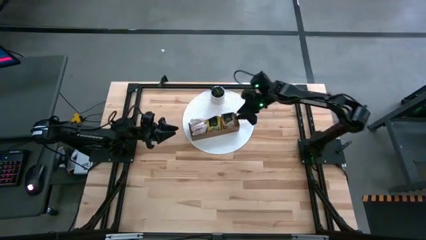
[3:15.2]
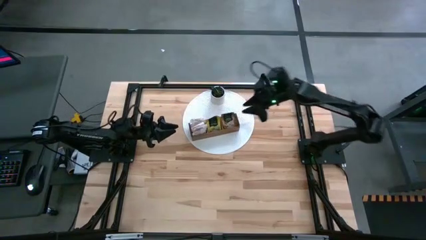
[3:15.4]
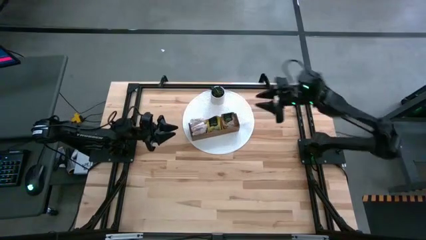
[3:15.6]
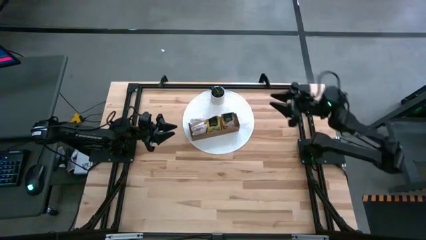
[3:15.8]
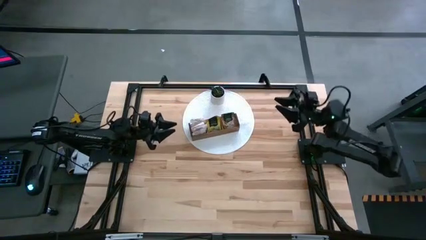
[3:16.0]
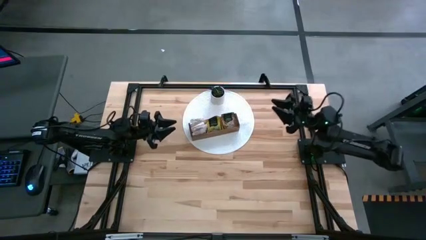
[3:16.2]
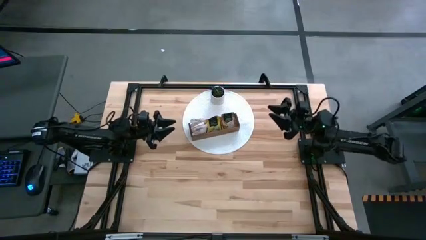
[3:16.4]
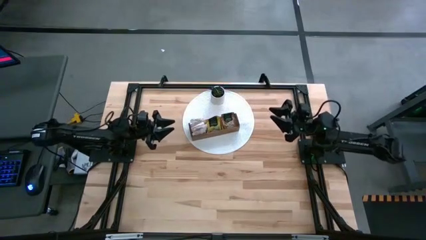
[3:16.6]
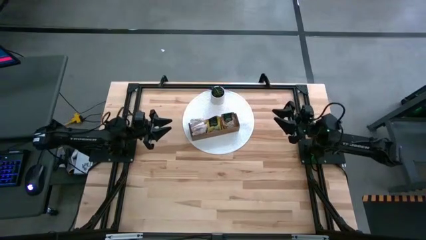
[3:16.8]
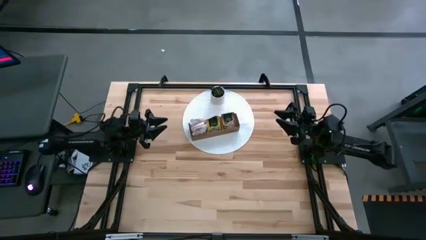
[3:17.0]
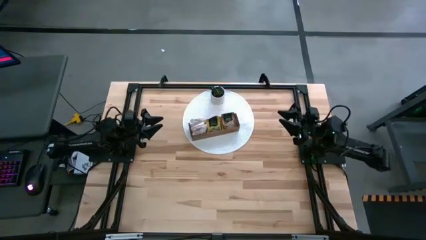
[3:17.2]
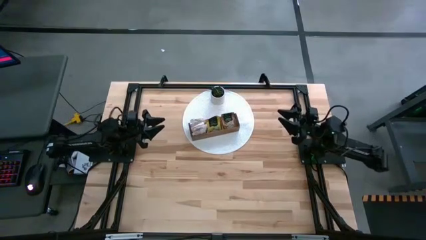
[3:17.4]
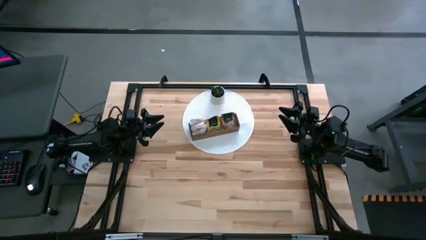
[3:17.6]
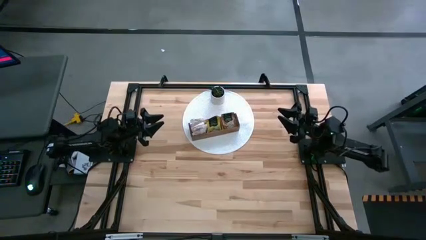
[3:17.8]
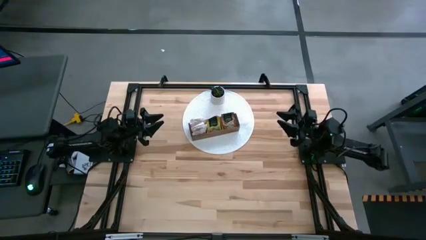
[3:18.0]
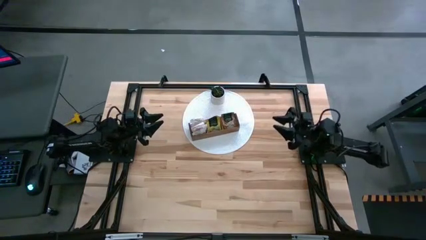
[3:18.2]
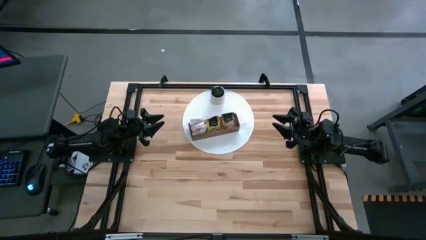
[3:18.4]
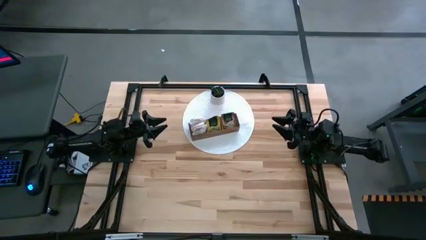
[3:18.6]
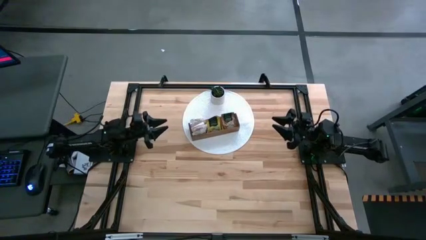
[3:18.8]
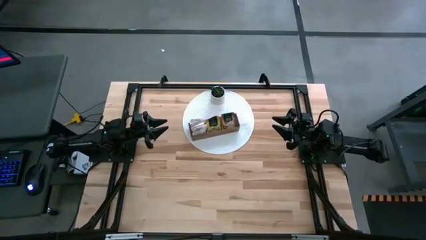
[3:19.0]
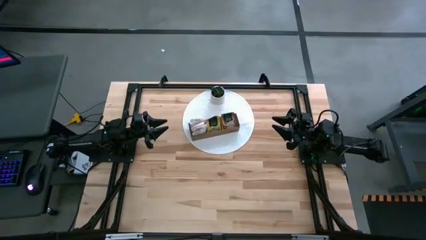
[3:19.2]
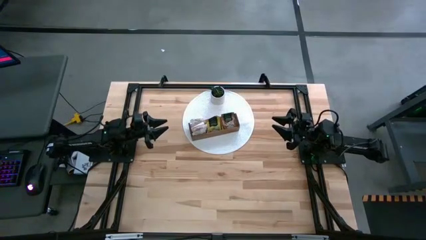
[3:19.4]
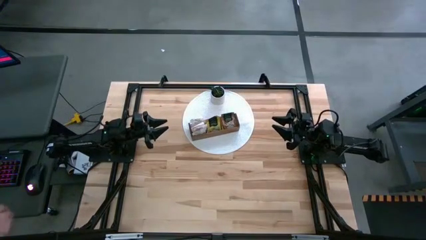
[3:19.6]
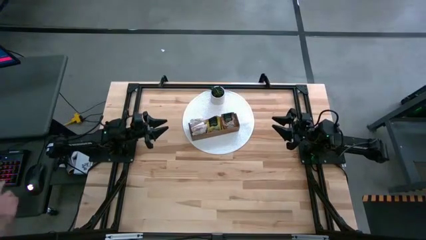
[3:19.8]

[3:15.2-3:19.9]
Task: Pick & Place Tea
Return to Home Position

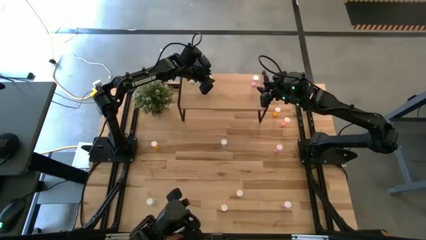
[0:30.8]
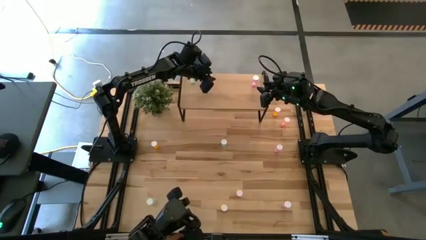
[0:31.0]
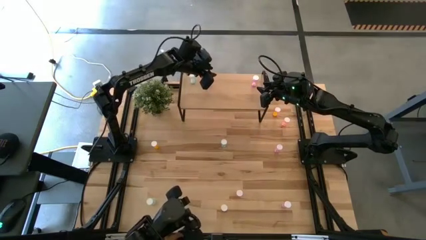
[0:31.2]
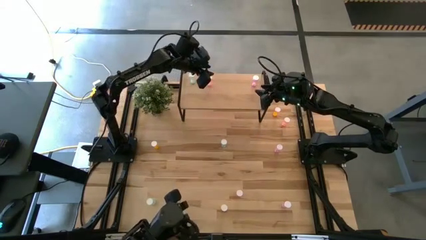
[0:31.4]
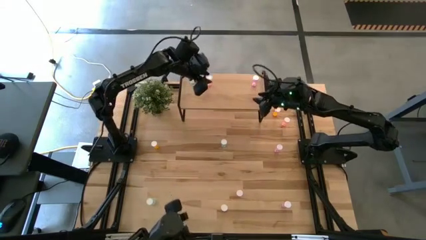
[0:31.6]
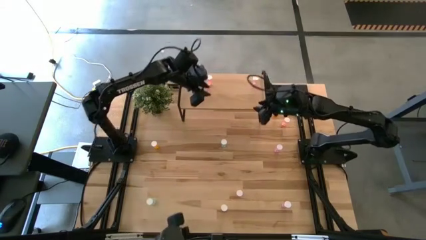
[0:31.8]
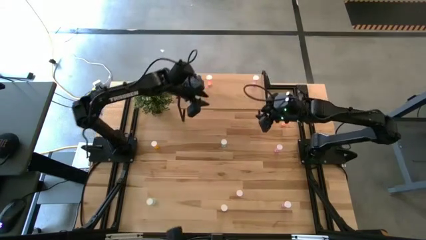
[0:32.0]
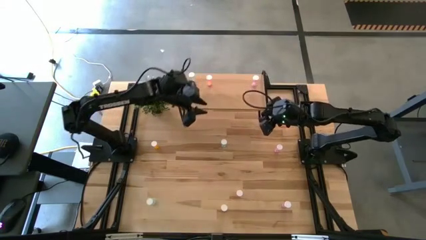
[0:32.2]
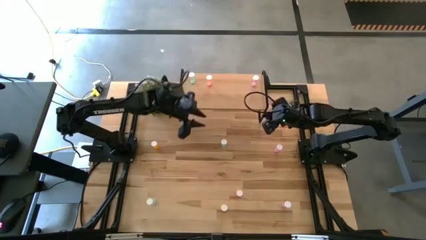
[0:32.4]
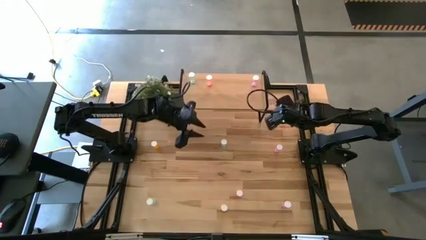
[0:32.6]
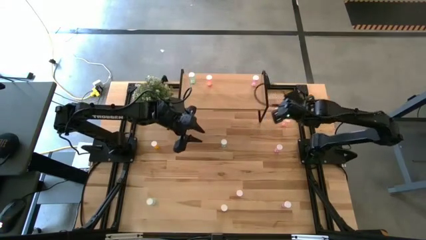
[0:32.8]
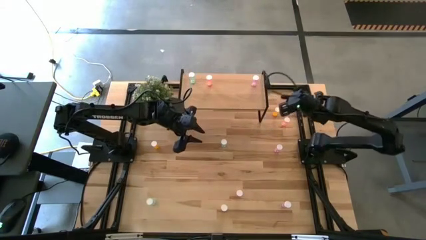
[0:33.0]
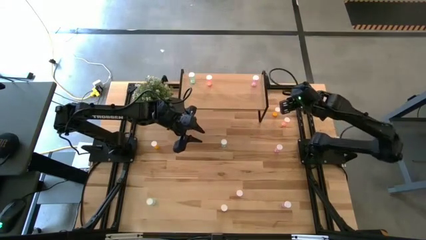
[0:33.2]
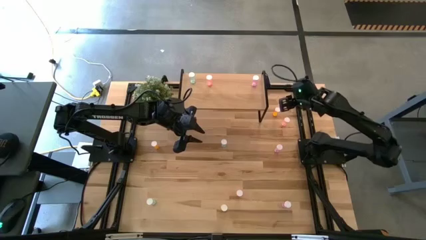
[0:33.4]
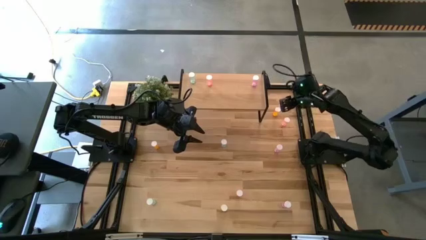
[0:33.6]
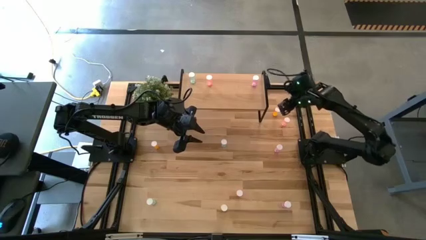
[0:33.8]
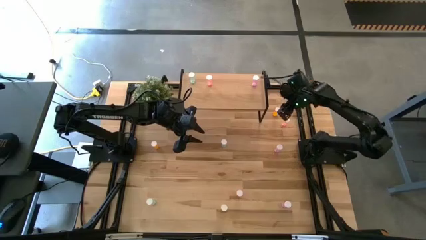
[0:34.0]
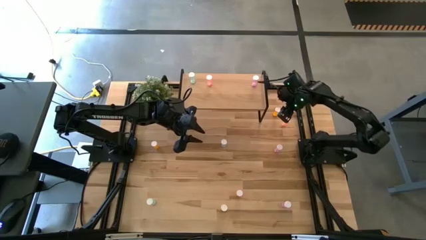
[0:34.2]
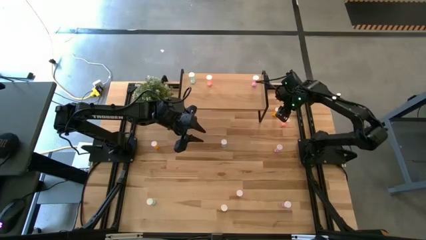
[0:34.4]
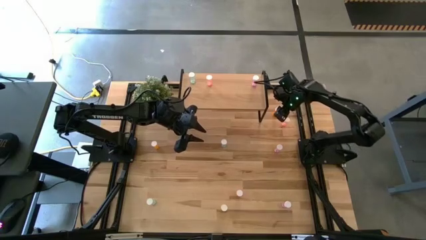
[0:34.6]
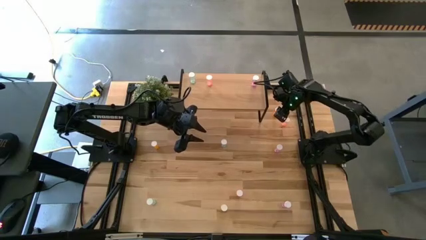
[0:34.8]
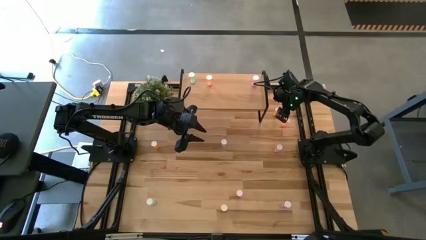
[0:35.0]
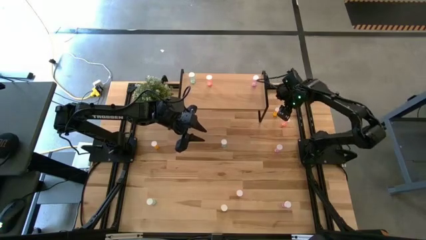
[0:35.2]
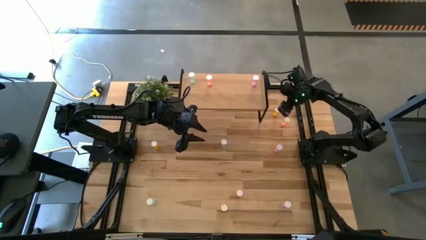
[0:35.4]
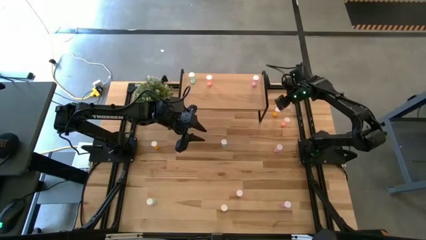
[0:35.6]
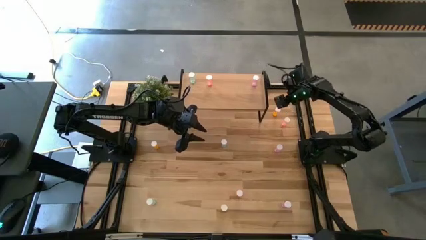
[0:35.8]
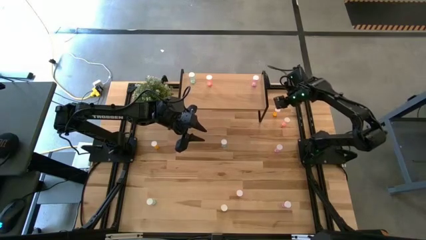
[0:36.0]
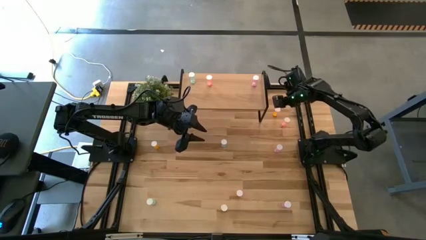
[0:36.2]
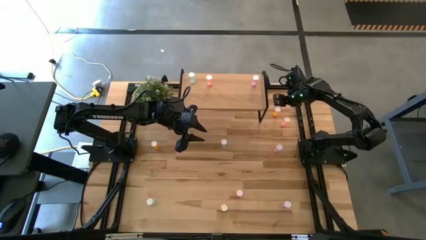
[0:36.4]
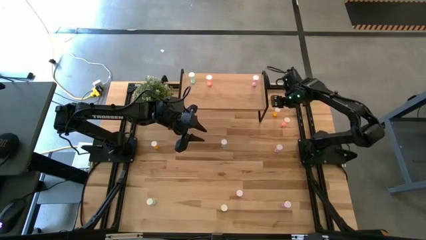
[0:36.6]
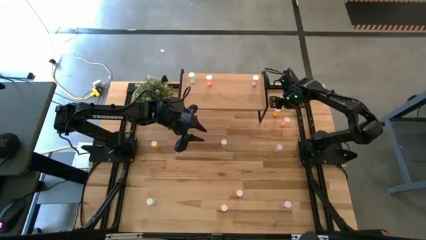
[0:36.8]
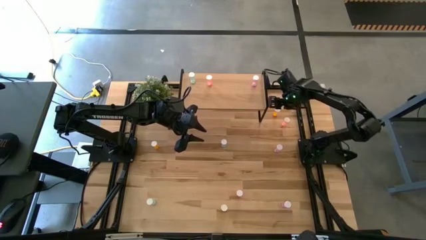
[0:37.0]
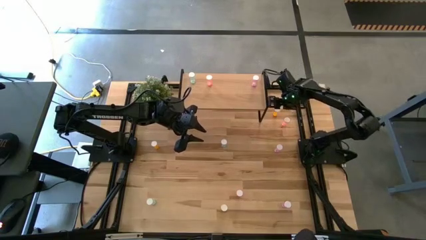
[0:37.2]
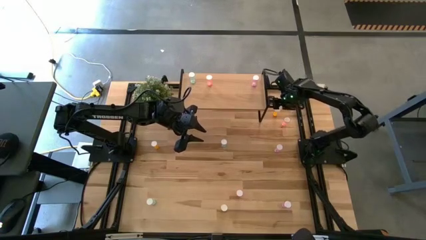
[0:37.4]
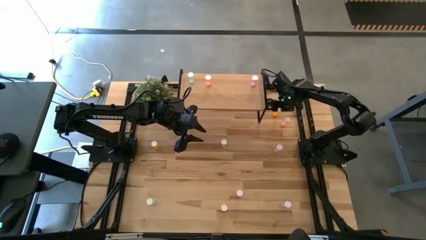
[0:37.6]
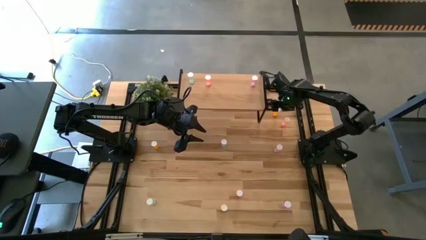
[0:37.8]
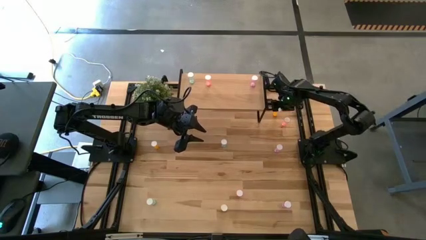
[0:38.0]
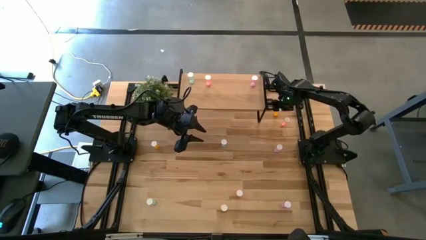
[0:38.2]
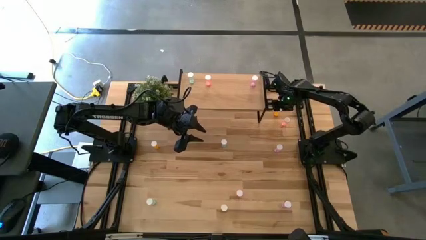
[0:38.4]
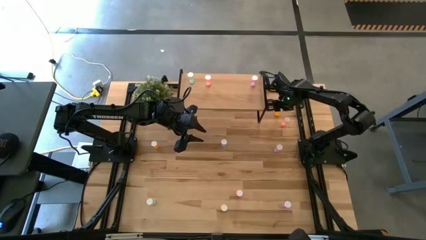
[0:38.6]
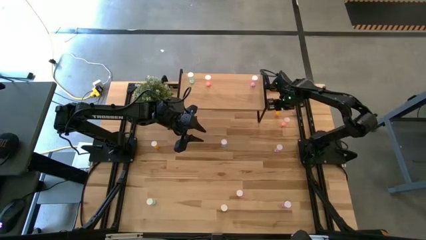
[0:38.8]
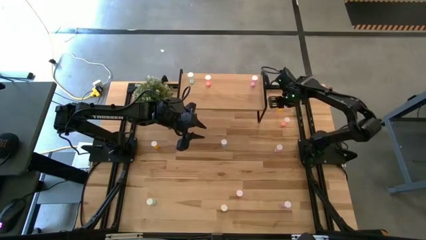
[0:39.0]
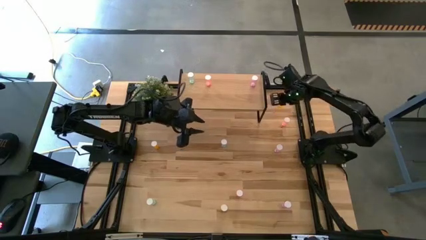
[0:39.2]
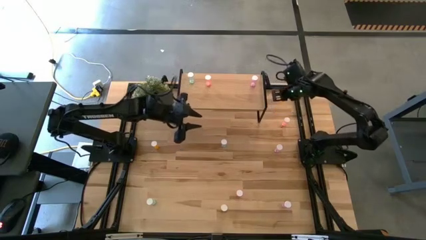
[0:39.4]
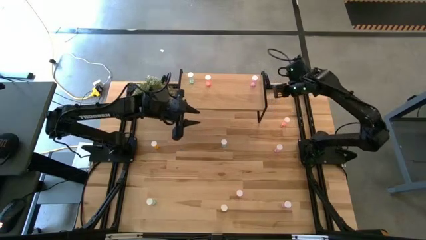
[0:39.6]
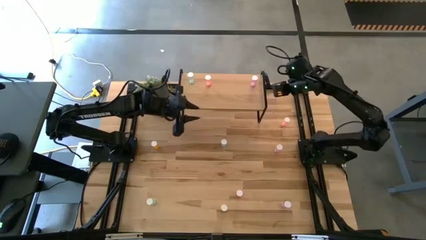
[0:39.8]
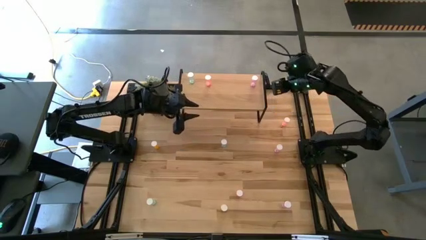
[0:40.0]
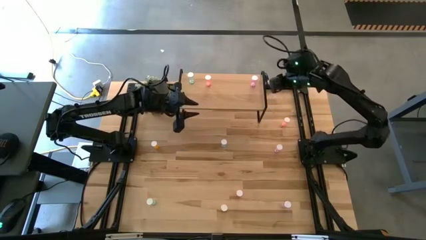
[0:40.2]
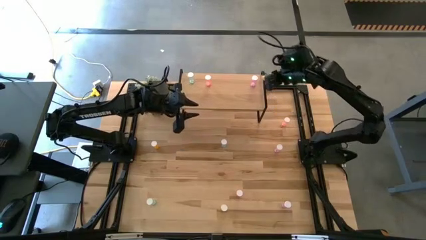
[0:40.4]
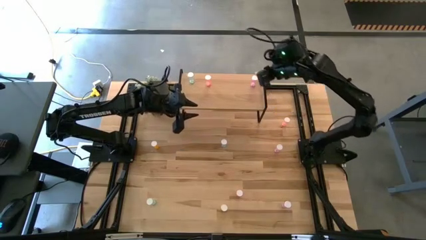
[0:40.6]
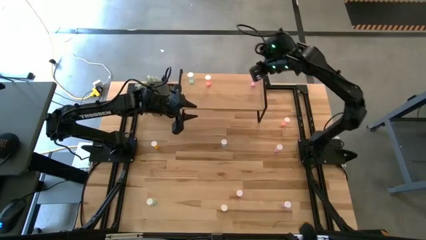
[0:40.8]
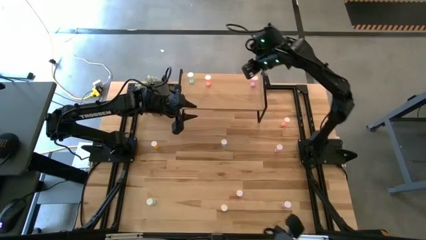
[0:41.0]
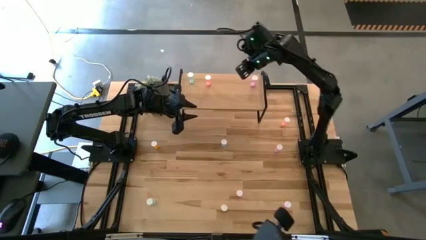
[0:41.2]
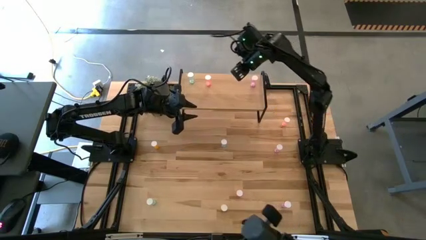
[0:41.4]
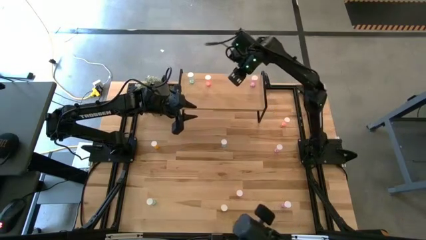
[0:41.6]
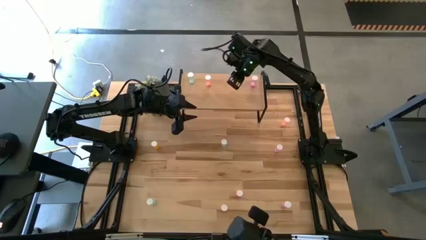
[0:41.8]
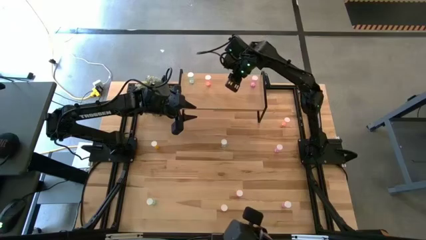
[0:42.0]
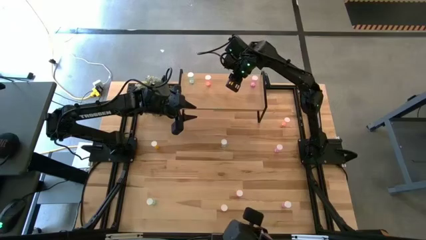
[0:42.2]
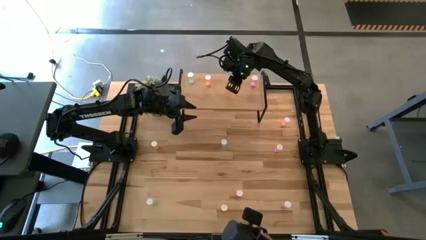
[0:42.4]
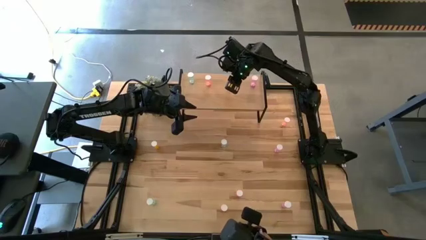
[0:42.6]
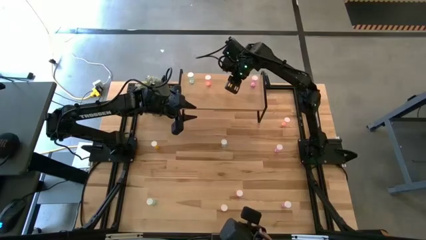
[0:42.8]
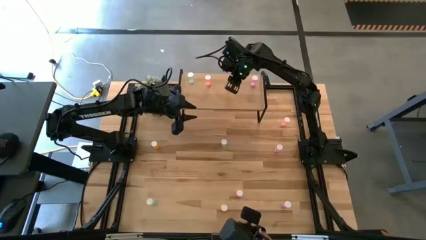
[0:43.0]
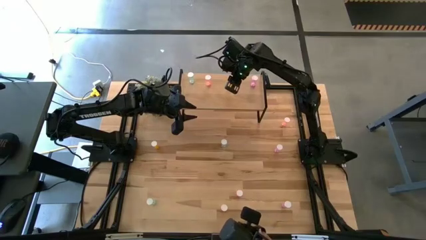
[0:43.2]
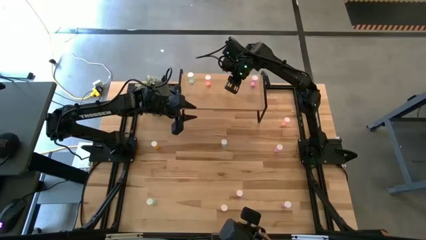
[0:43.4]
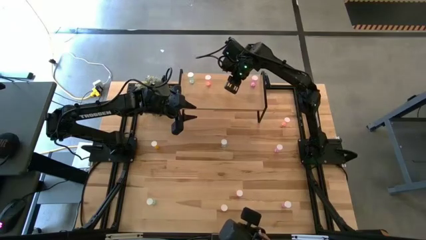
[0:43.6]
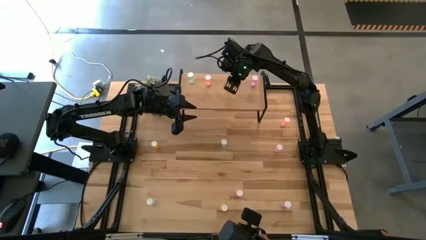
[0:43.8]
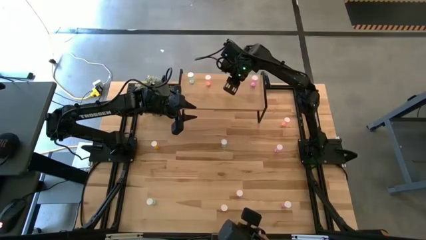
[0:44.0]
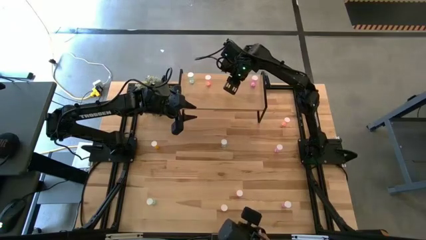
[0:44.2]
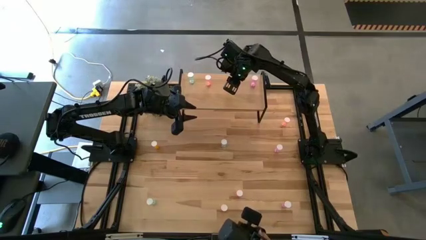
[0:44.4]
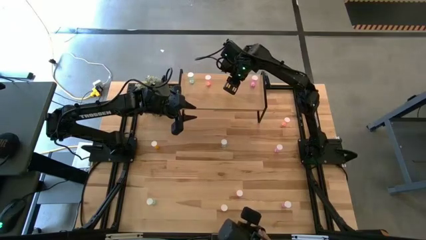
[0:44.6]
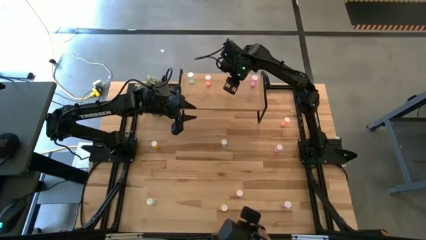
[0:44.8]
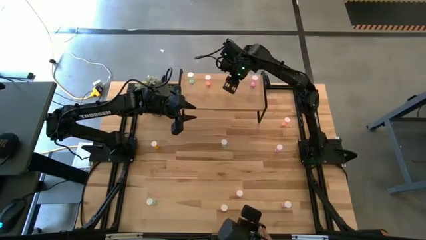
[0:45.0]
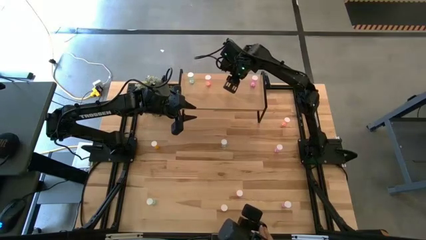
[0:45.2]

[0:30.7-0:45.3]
Task: Pick and place medicine bottles onto shelf by color
Put the top right orange pill bottle on the shelf
